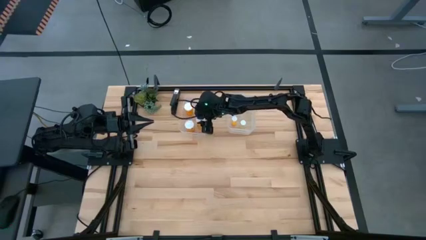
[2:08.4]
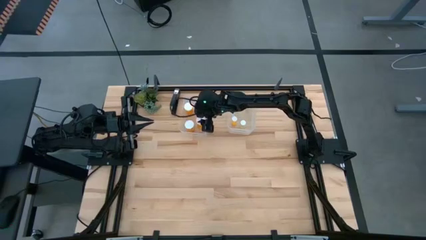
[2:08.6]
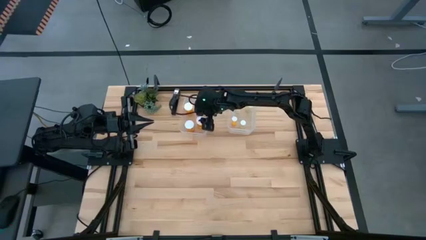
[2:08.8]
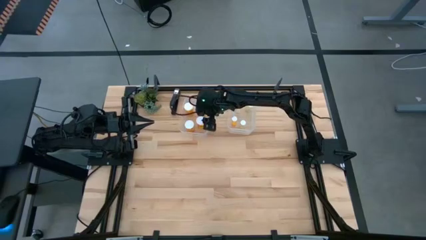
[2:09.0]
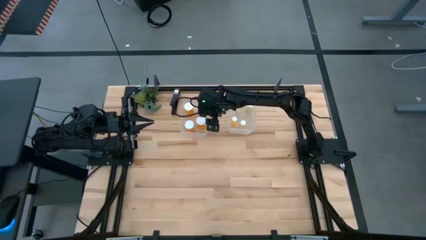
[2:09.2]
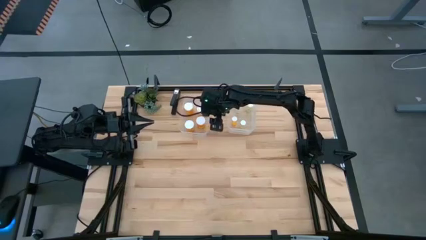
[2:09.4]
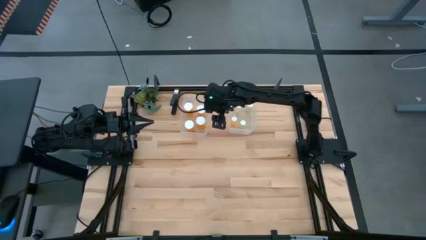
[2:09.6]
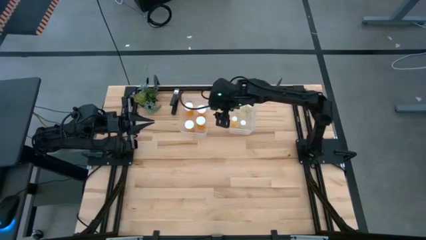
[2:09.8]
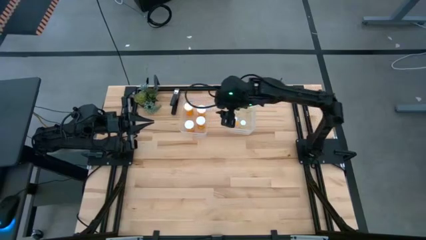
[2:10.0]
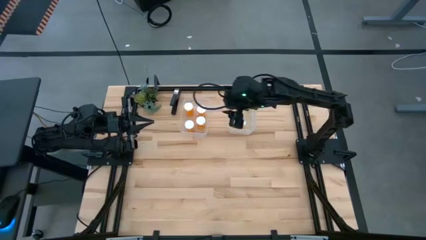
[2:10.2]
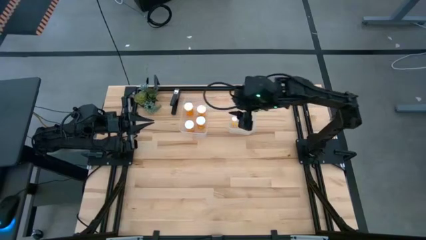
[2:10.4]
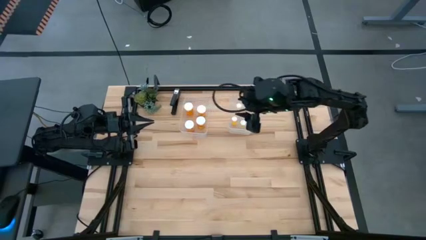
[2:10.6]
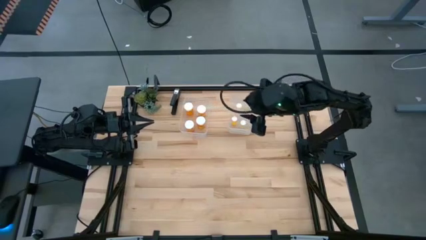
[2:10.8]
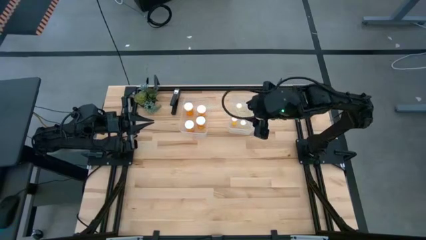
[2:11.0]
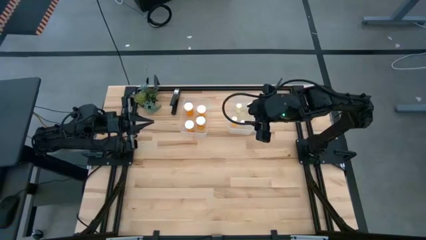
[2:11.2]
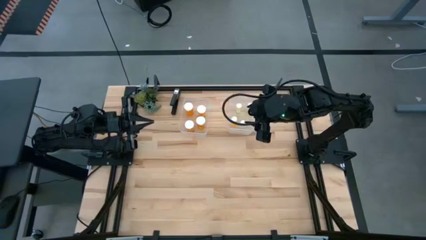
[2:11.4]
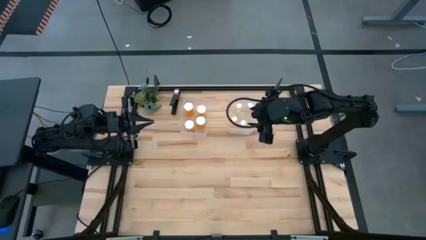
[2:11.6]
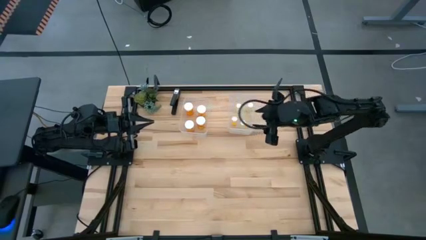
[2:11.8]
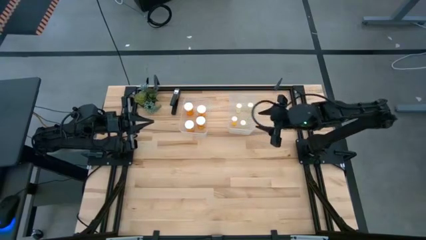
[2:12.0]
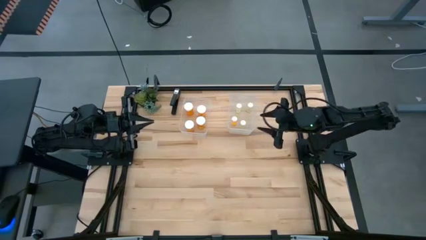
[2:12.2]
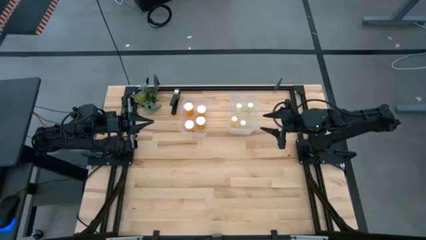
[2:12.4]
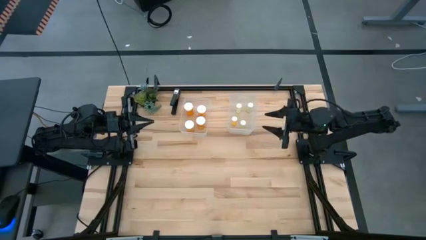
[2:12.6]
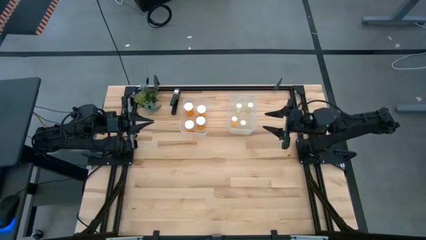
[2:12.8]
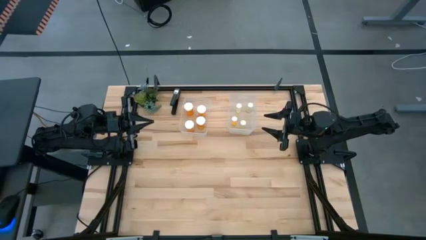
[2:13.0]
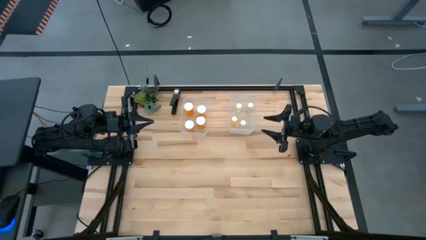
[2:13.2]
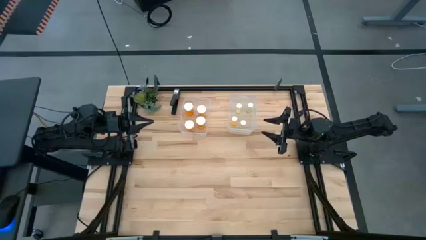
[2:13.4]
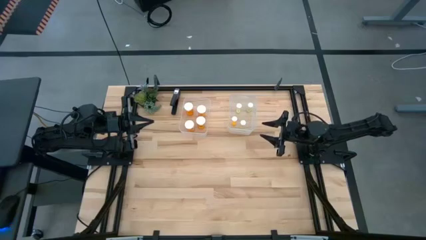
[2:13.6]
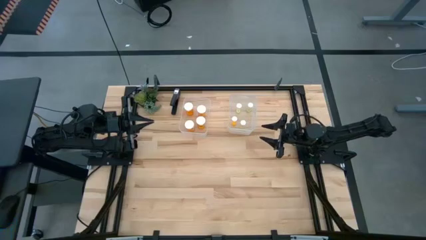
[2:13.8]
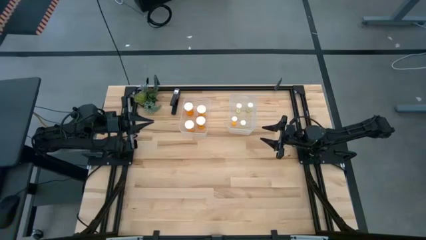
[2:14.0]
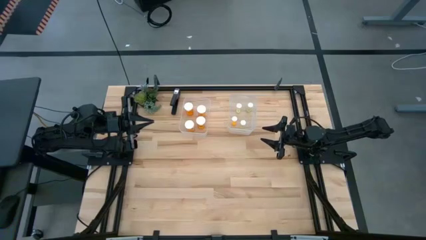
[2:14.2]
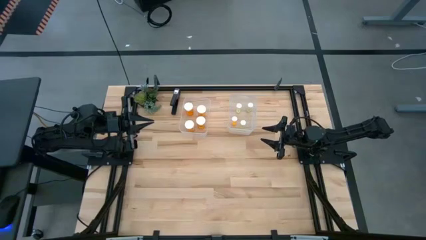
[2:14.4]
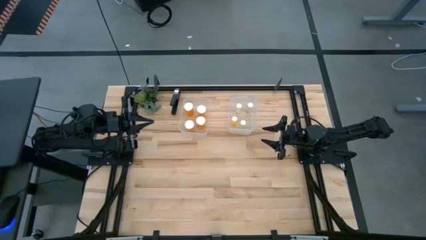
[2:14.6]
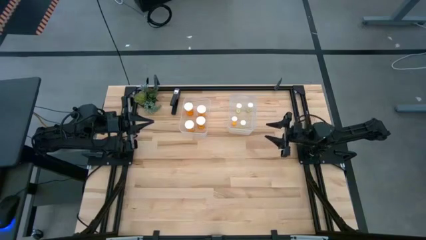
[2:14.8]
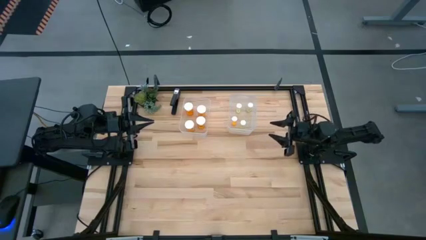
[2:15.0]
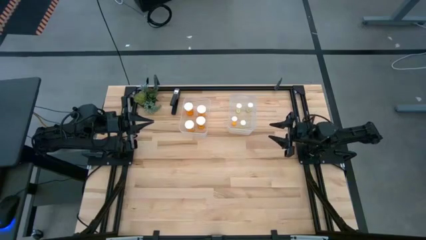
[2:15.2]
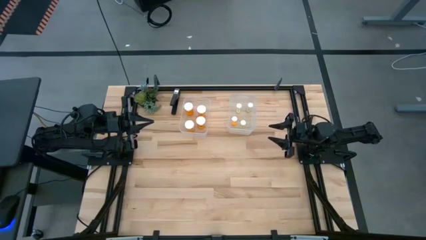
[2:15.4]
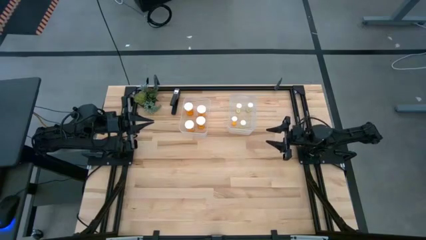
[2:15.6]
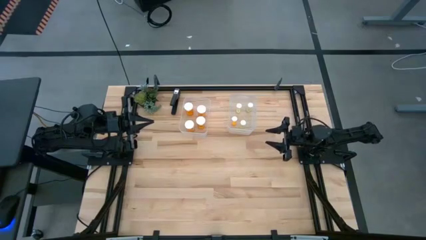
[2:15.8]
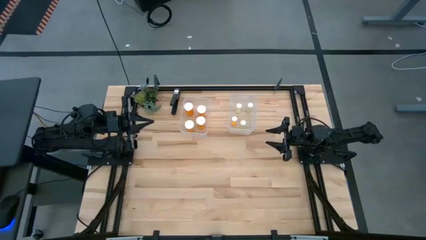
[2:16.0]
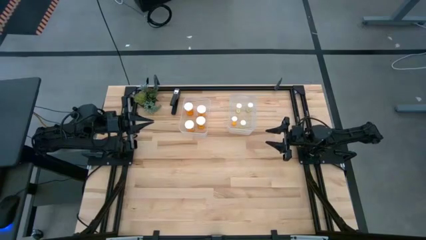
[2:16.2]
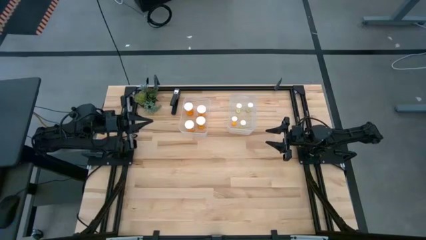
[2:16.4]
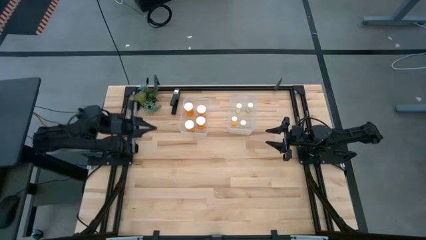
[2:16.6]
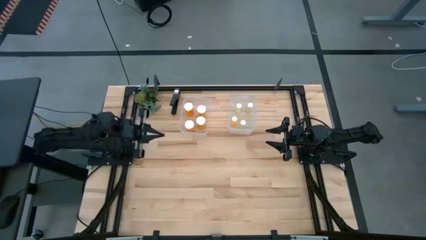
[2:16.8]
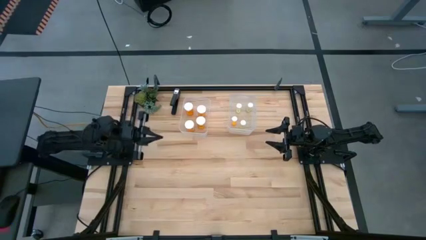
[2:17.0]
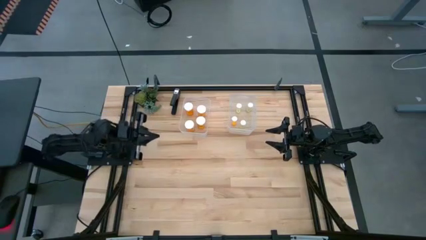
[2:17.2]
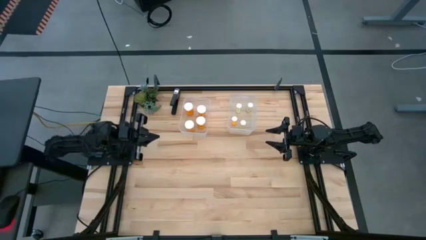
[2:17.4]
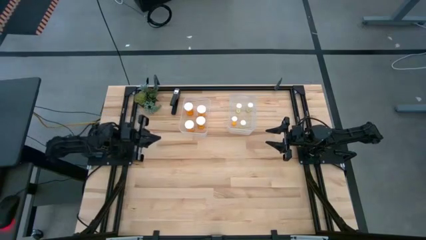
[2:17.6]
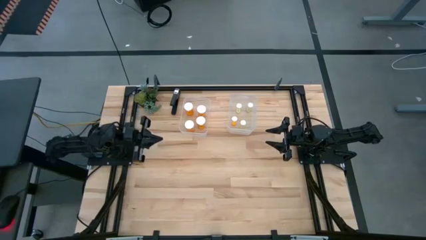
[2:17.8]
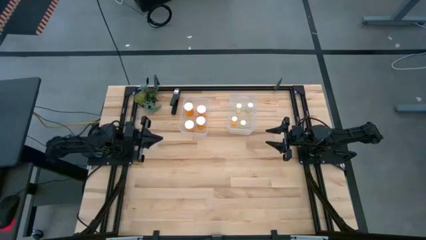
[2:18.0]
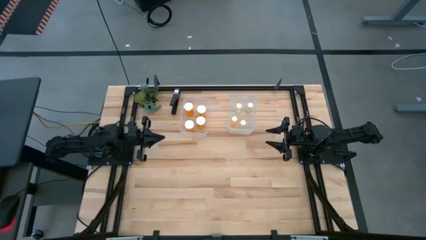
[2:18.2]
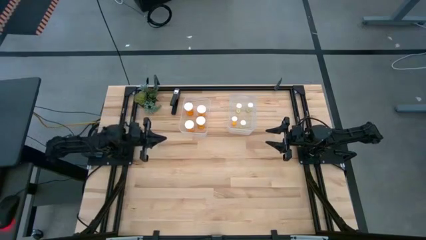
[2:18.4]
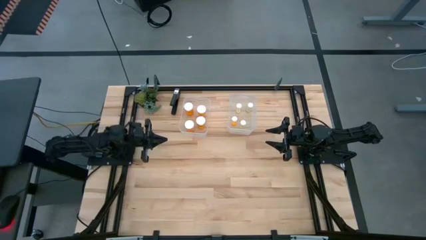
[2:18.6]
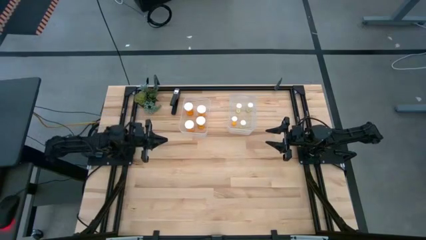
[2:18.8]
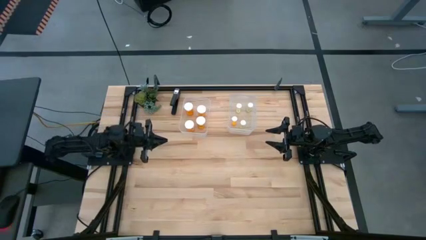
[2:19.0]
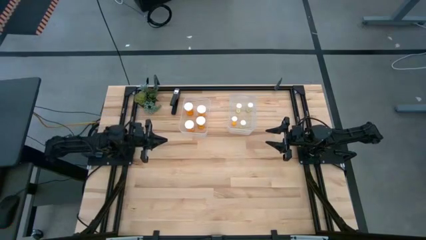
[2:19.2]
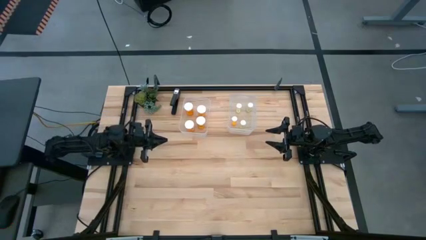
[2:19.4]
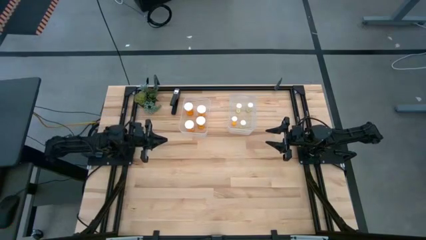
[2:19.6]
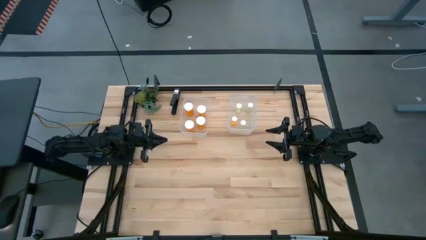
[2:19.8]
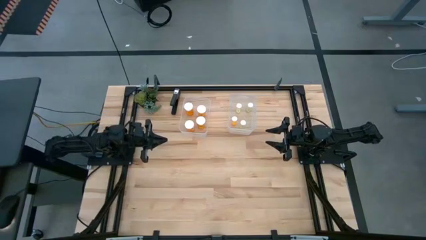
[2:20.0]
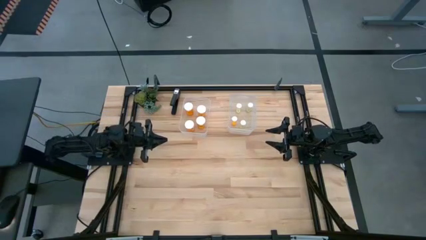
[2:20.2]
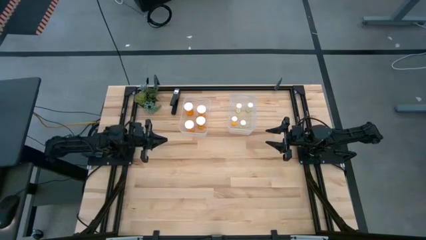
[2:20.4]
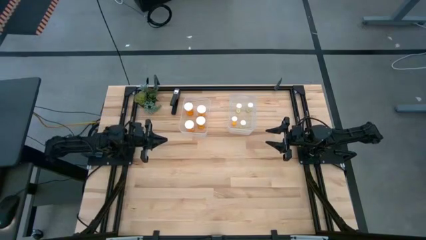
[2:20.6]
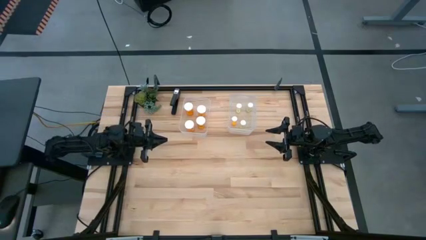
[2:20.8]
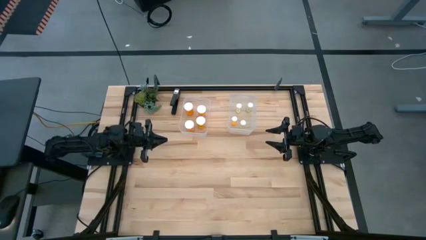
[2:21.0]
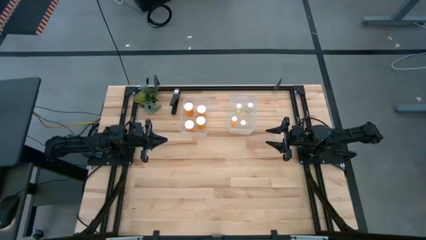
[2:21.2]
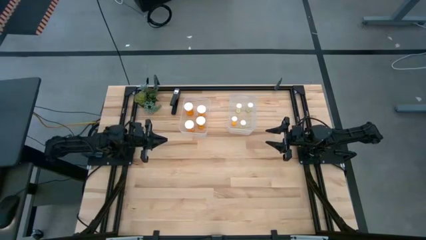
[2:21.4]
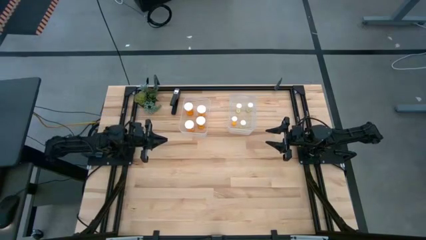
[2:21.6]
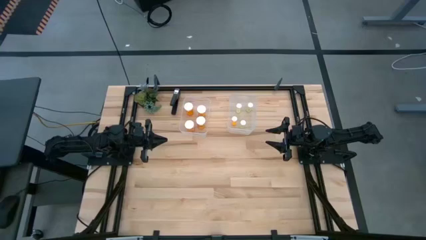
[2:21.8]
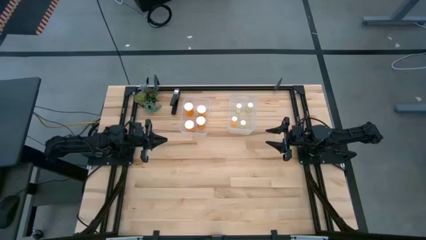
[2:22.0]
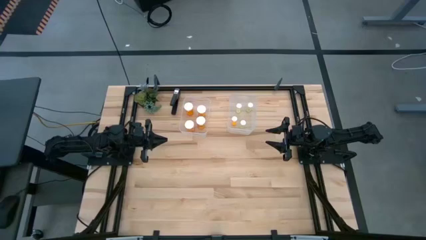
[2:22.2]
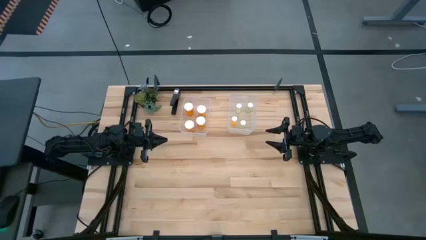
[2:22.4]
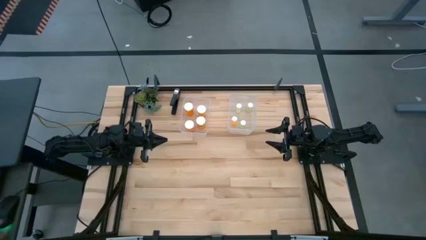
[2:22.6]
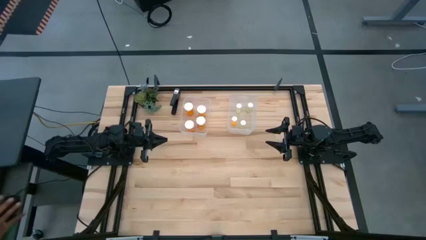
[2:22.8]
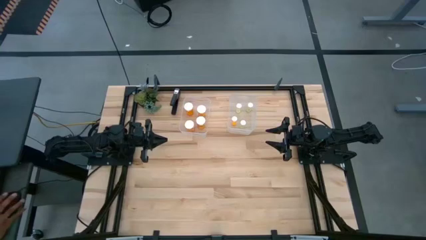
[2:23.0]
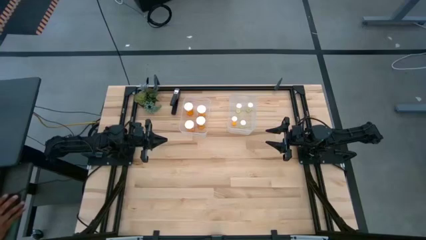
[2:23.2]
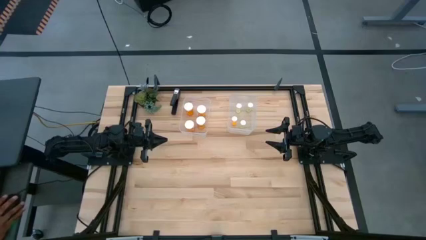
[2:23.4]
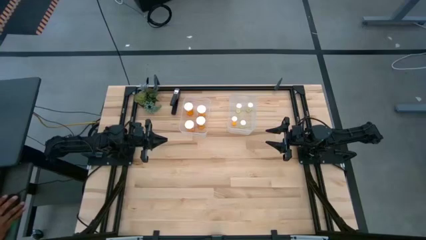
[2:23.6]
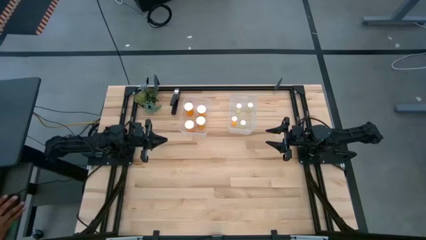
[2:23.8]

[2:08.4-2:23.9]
Task: Pick and place medicine bottles into bin by pill shape (circle, oval)
Return to Home Position
